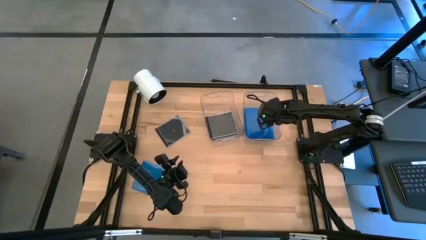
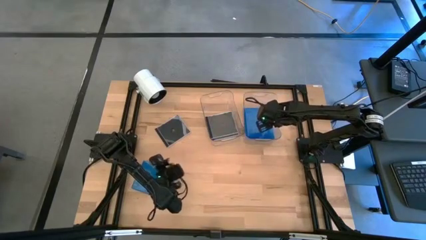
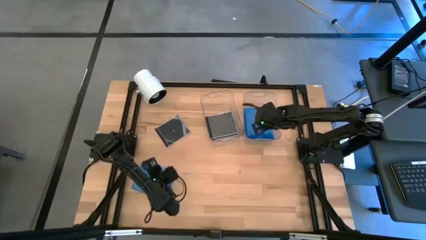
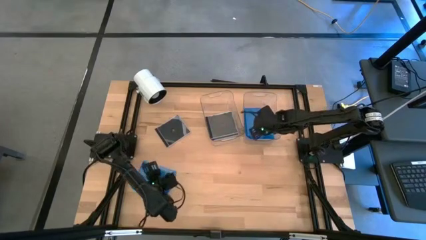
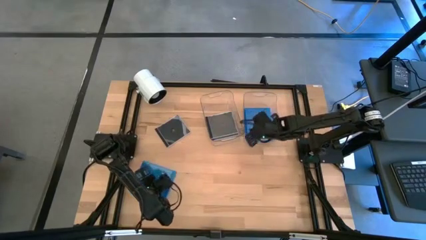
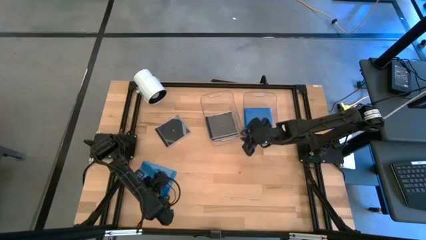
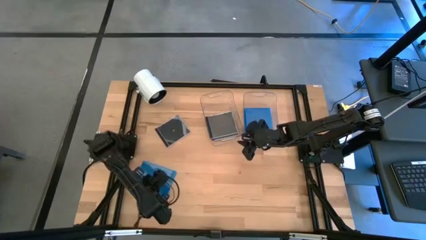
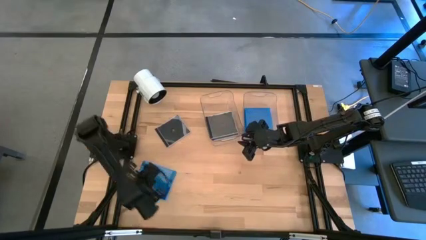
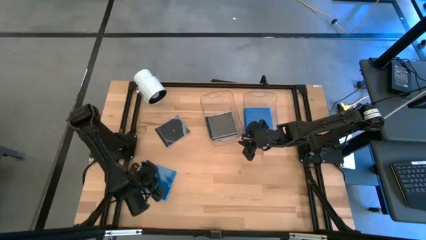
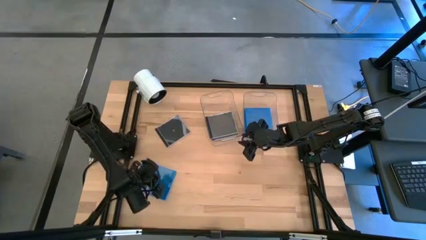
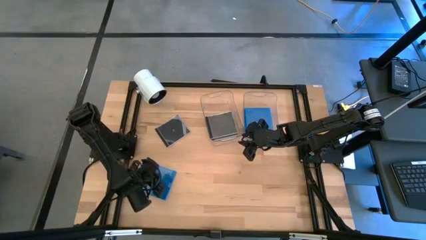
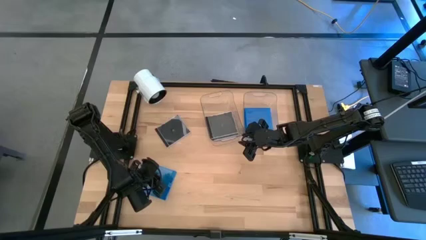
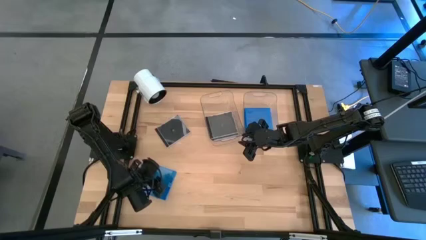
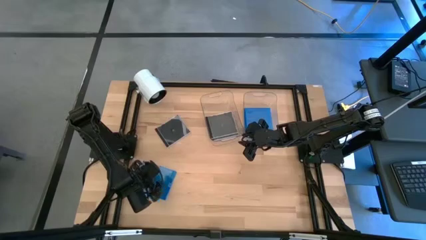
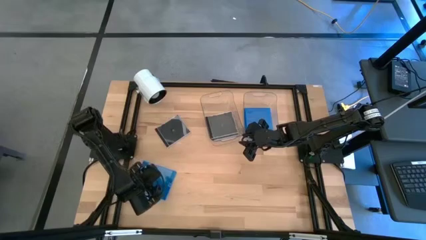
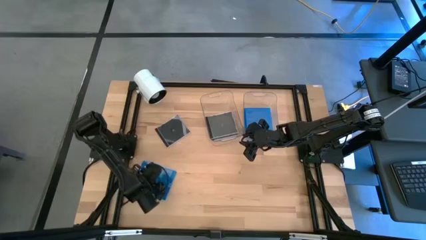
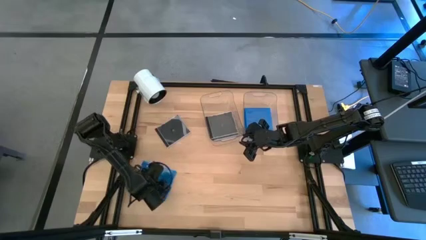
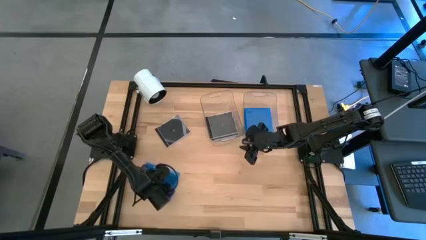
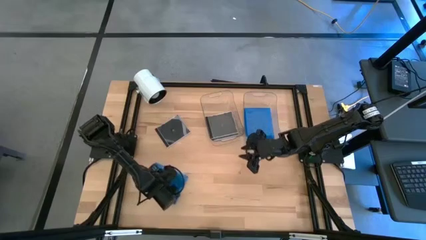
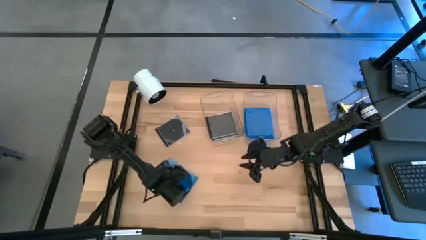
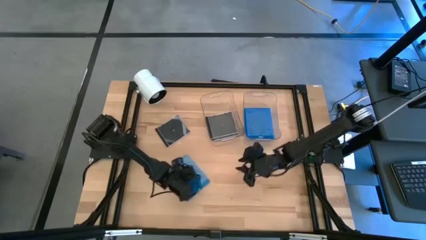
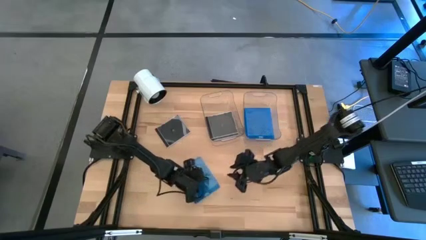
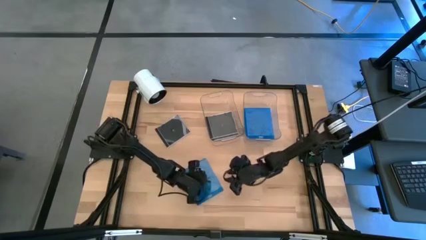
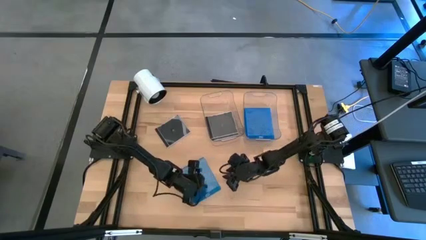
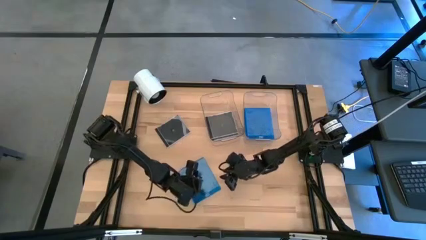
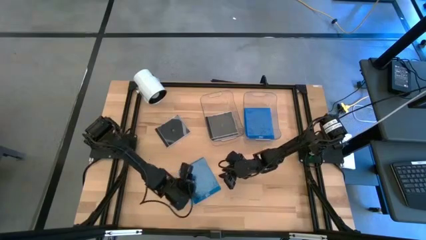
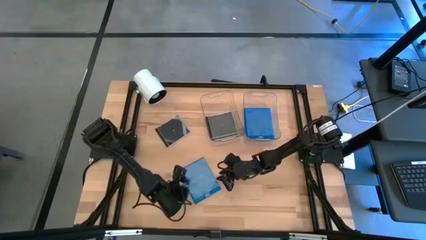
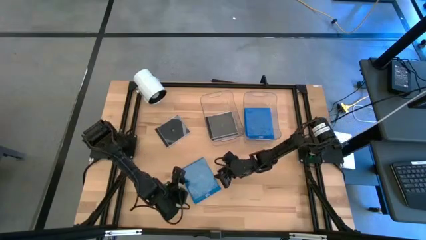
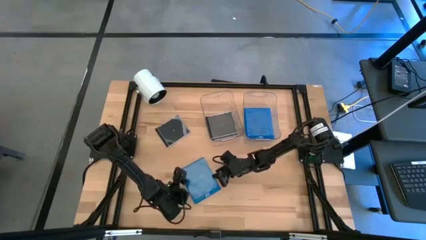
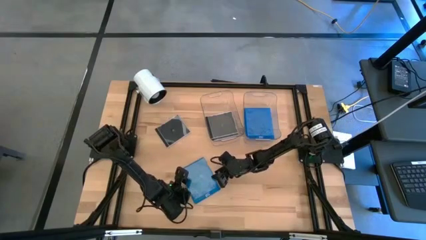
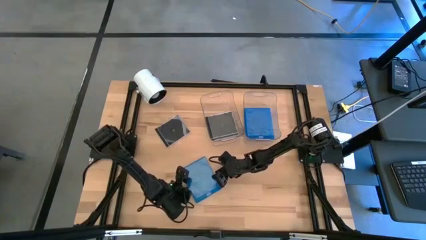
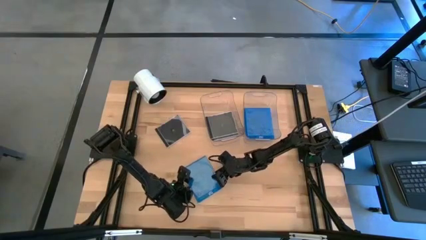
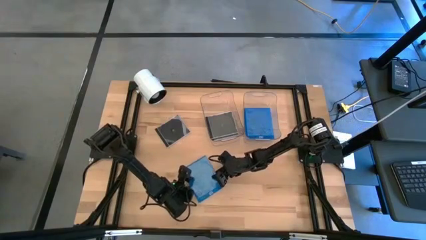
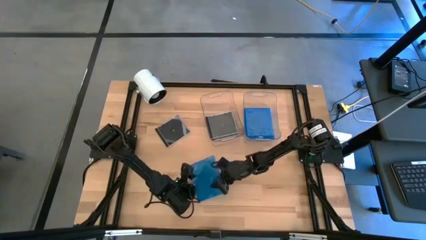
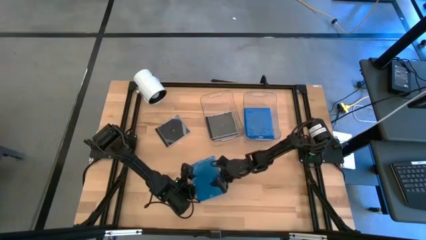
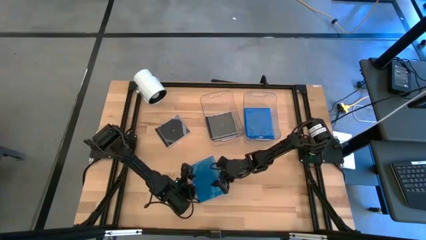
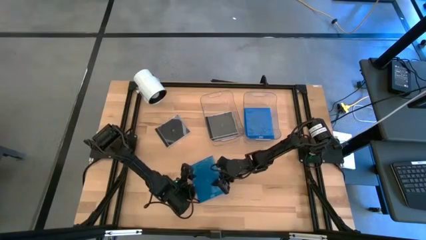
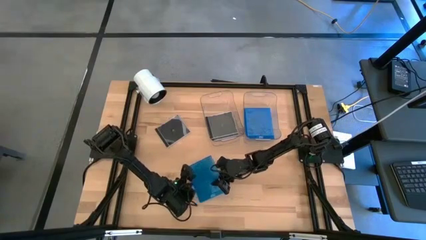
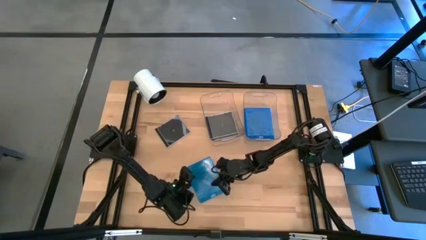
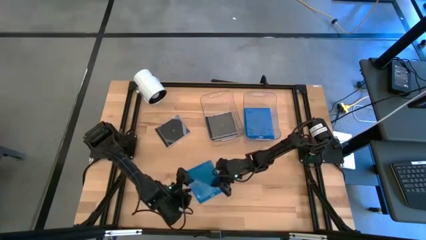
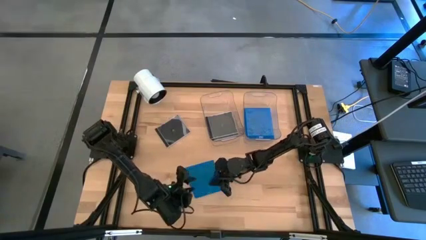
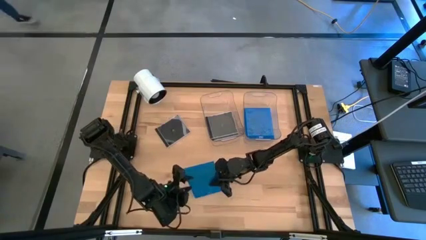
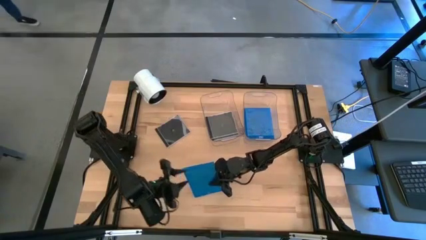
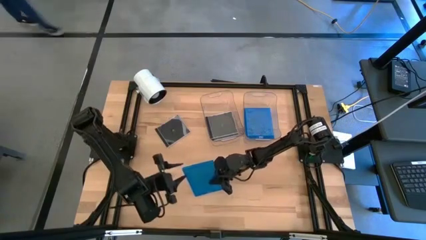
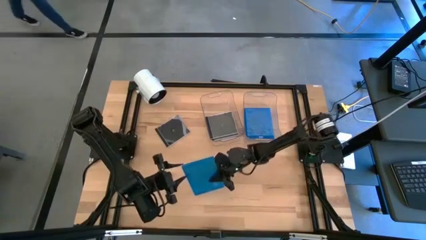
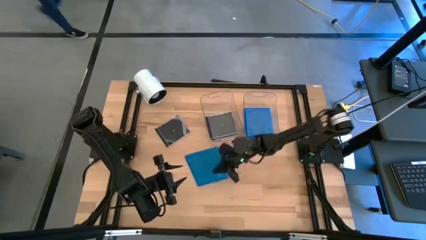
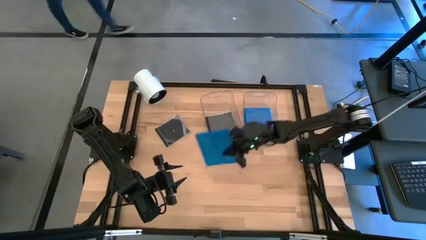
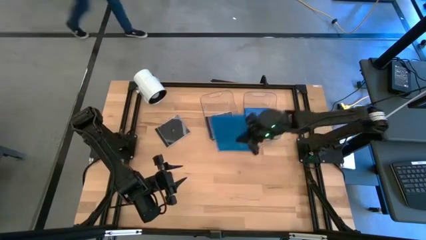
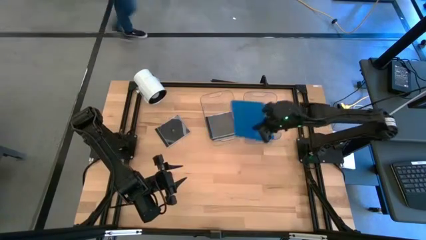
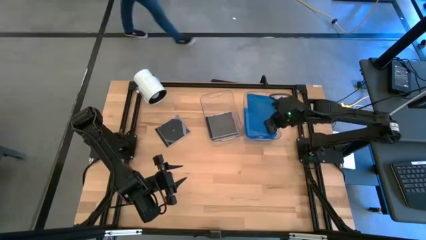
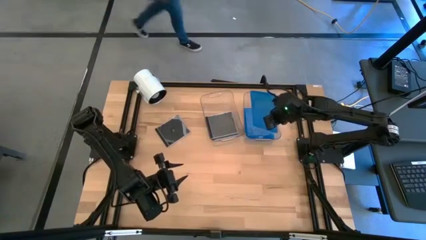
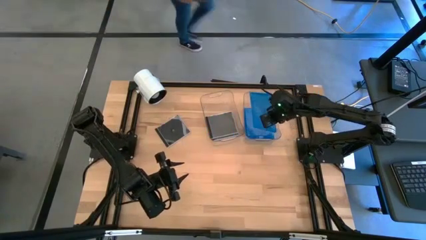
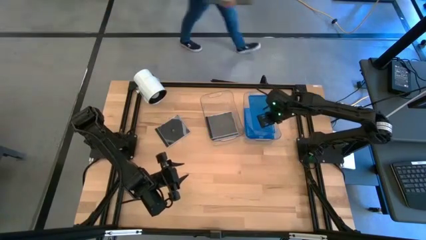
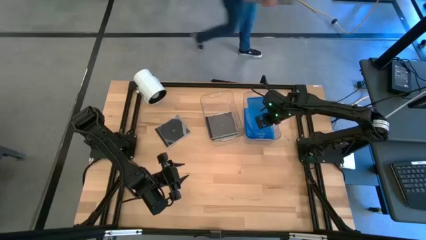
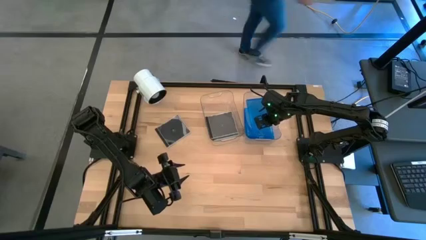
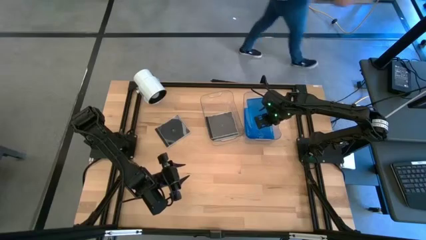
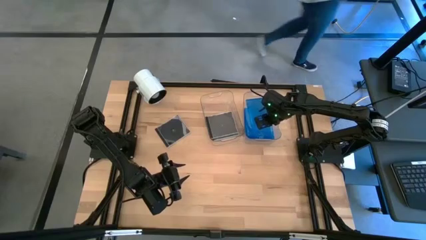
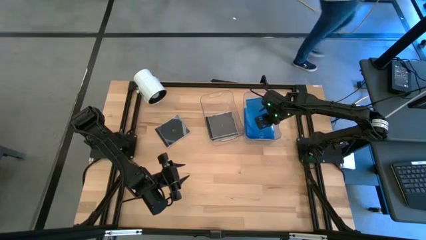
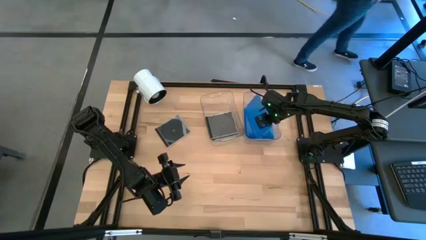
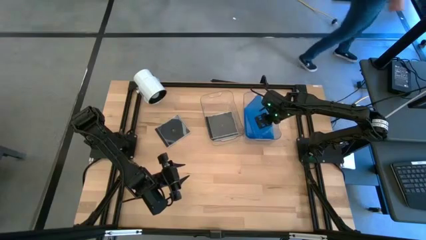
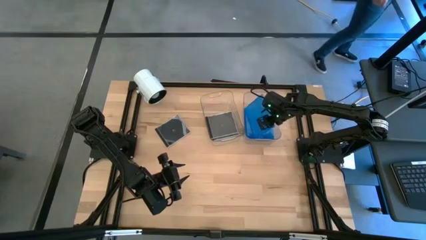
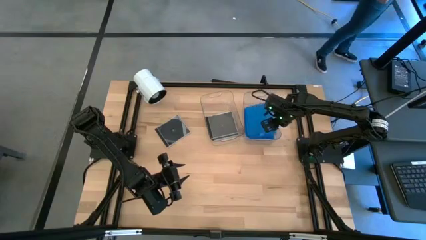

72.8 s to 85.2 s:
Task: Pick & place jewel cases by type
Put the blue cd case into the right transparent bin

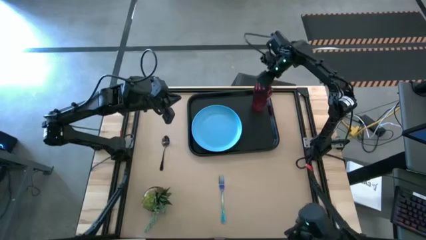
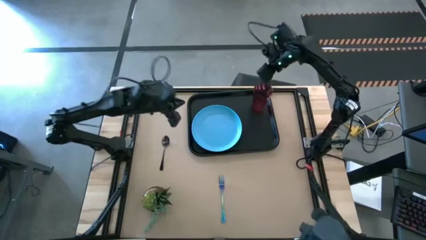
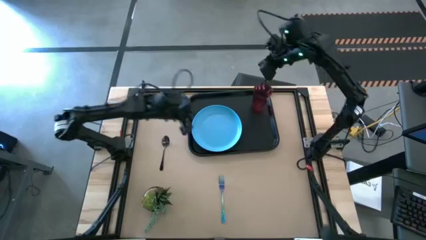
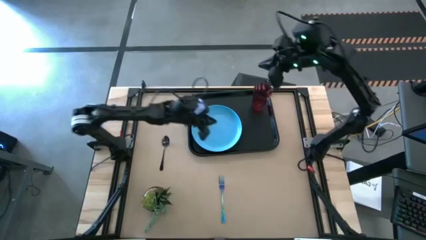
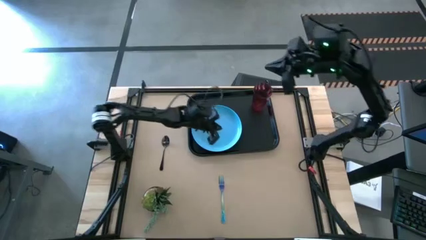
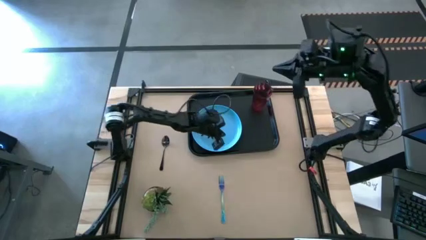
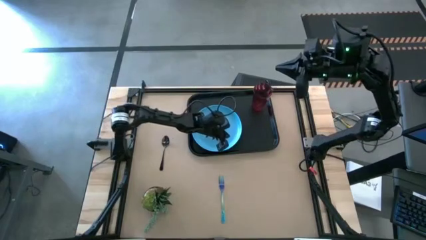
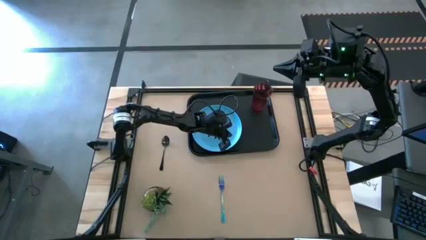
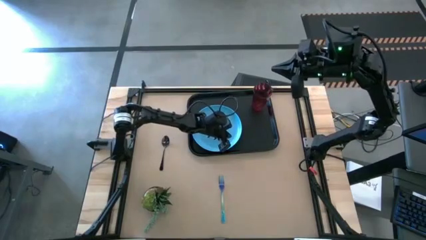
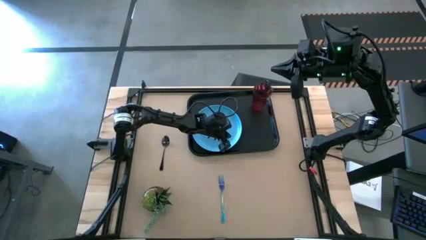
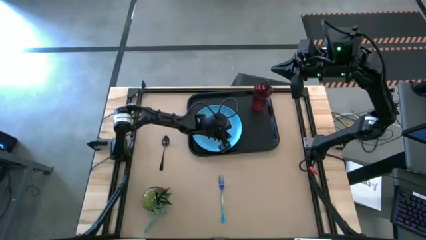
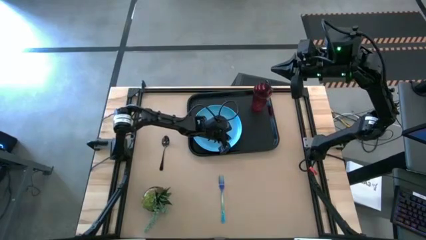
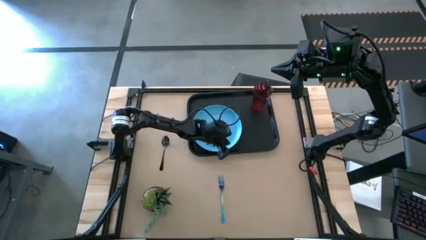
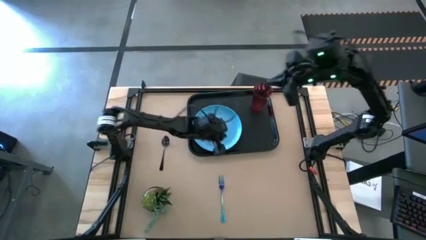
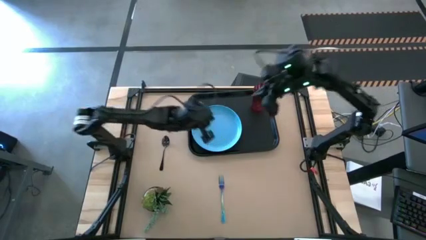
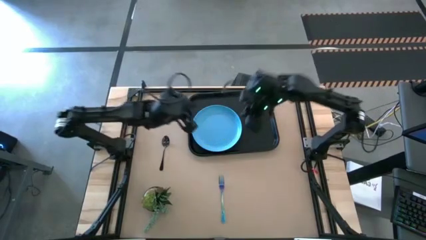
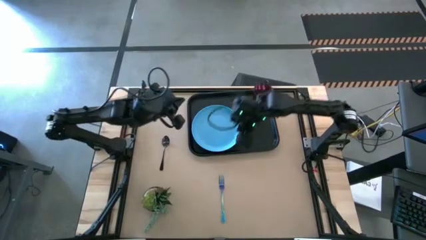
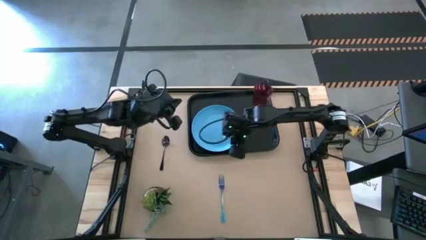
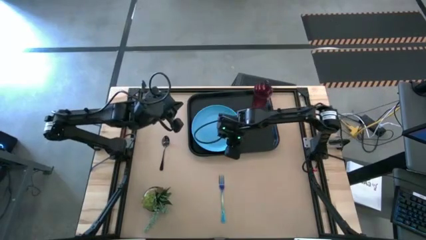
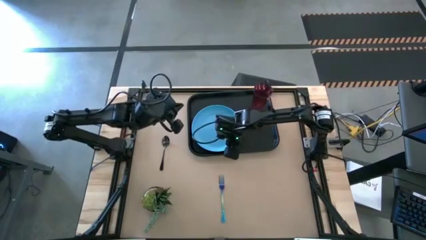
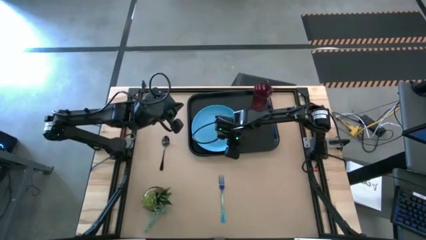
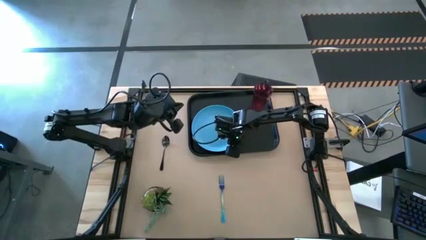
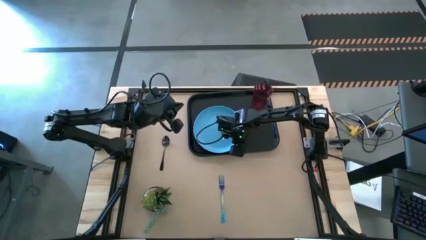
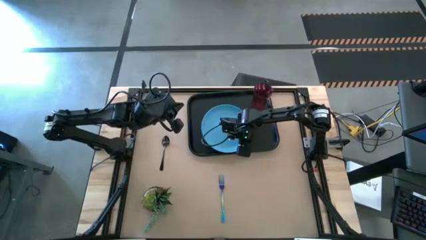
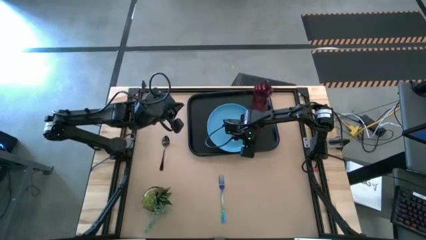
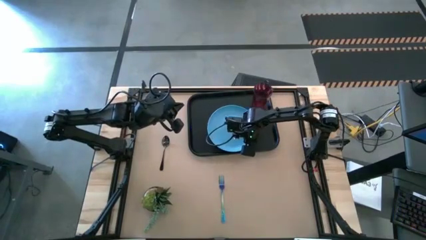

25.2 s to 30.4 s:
Task: Pick and place plate/cup/fork/spoon on tray
Adjust the blue plate
